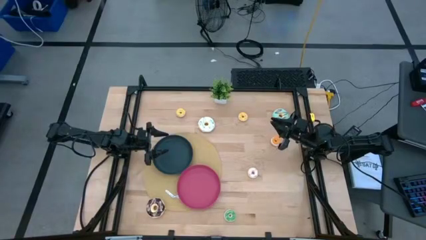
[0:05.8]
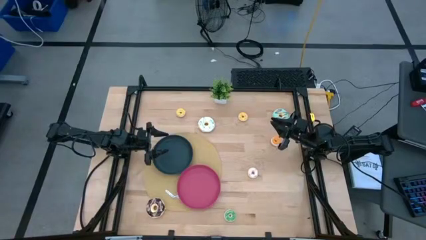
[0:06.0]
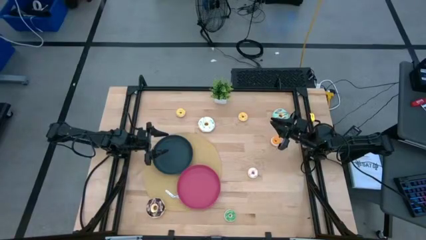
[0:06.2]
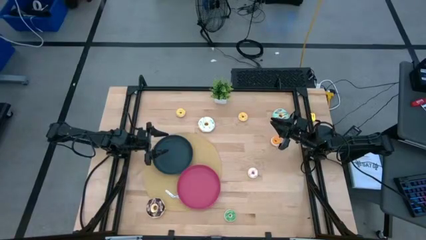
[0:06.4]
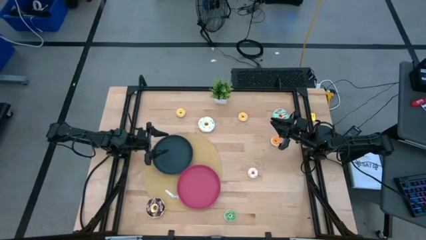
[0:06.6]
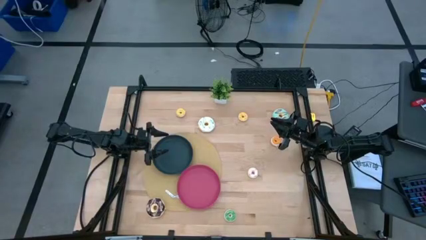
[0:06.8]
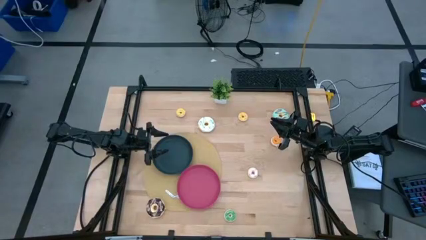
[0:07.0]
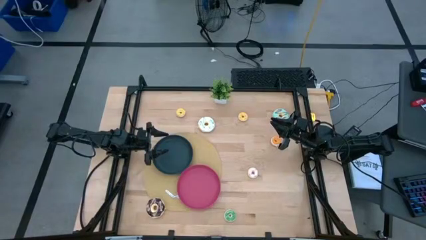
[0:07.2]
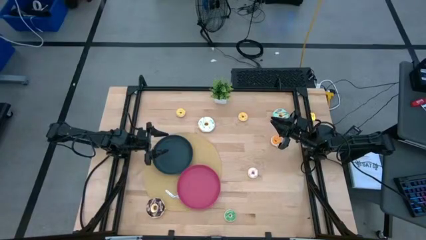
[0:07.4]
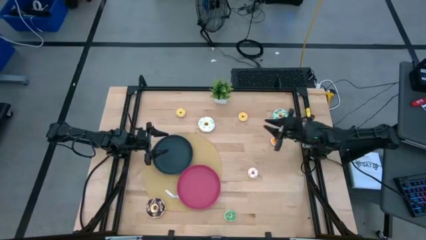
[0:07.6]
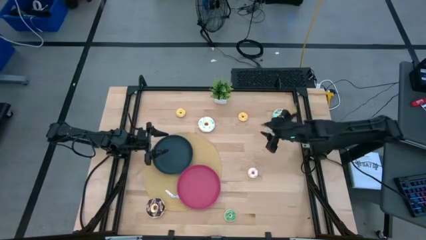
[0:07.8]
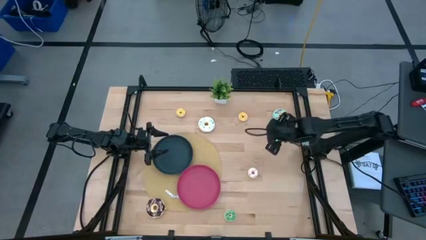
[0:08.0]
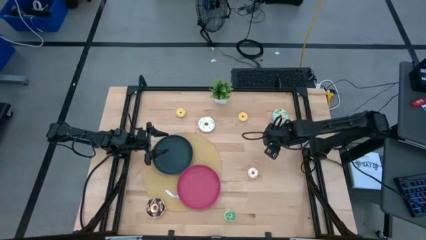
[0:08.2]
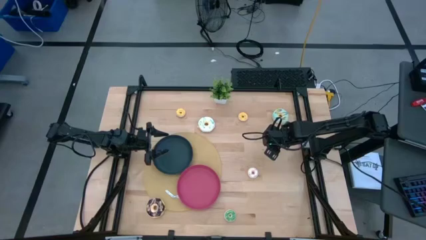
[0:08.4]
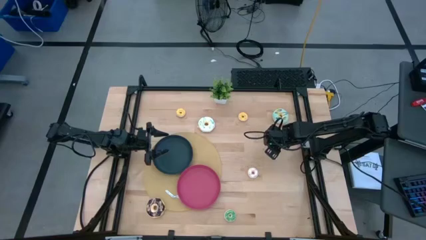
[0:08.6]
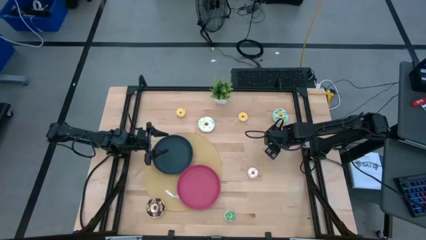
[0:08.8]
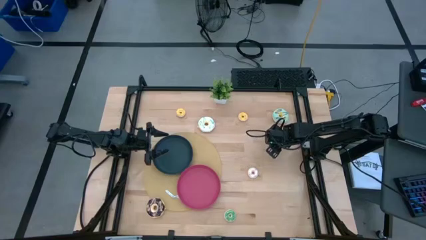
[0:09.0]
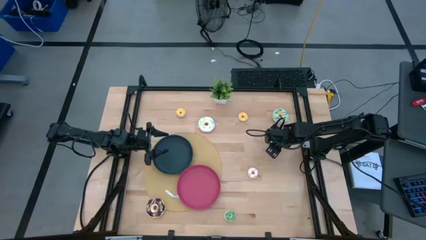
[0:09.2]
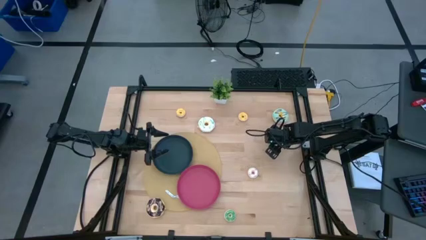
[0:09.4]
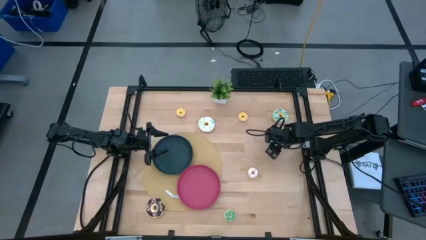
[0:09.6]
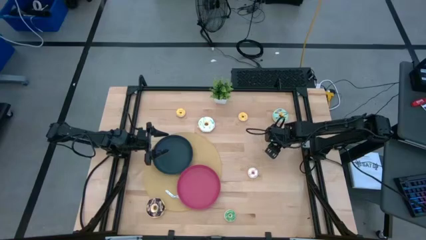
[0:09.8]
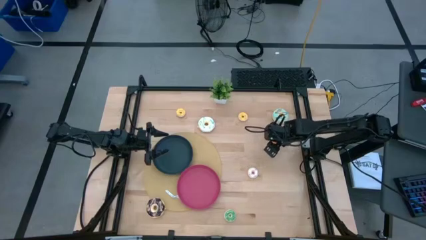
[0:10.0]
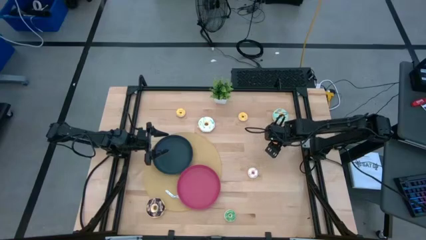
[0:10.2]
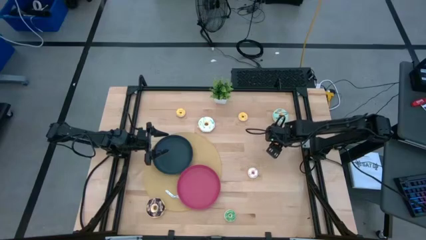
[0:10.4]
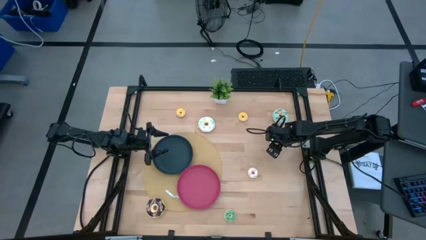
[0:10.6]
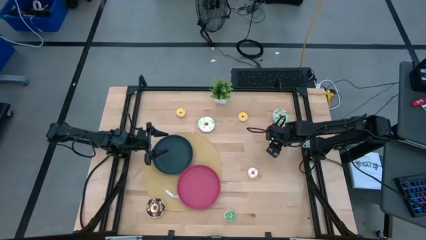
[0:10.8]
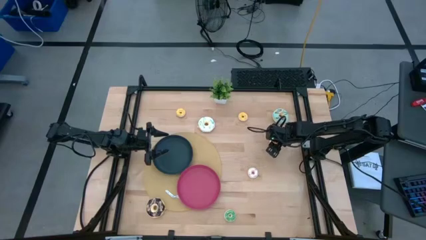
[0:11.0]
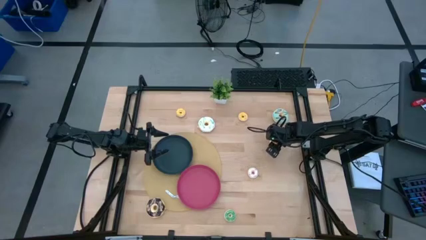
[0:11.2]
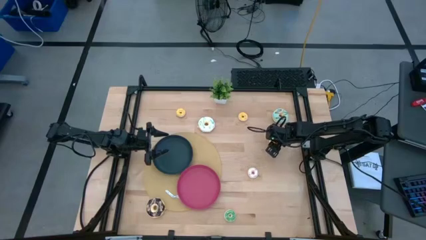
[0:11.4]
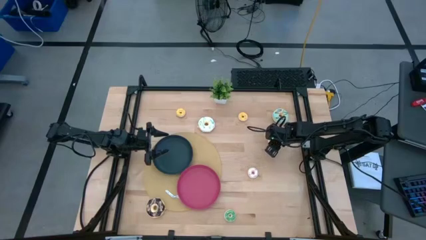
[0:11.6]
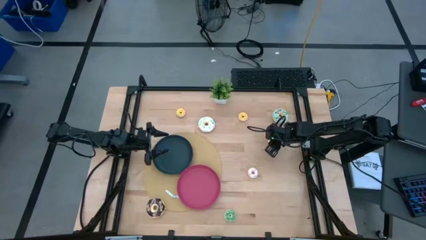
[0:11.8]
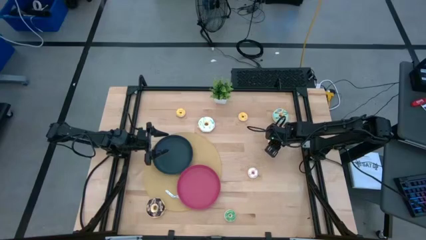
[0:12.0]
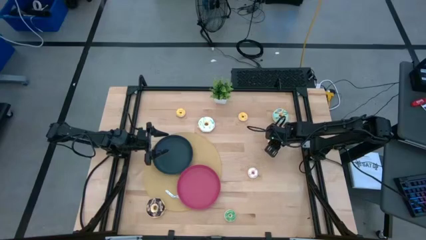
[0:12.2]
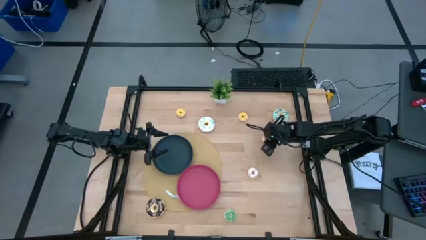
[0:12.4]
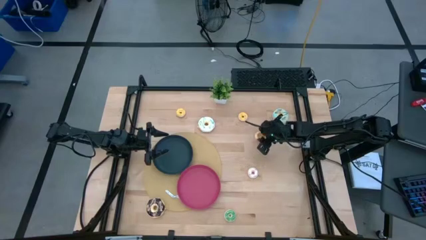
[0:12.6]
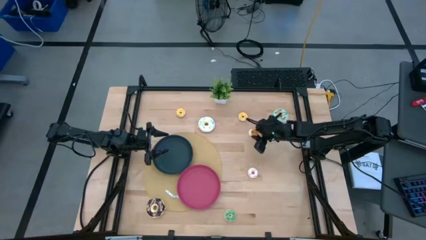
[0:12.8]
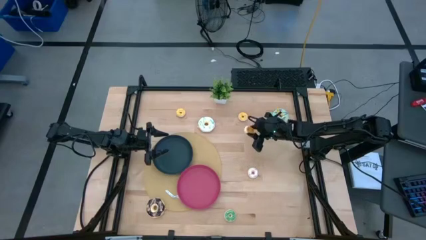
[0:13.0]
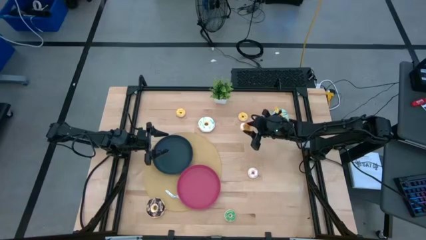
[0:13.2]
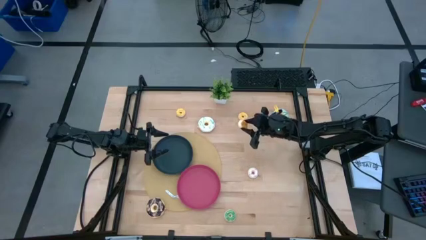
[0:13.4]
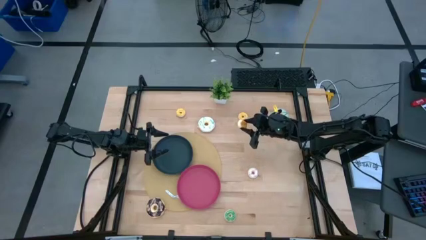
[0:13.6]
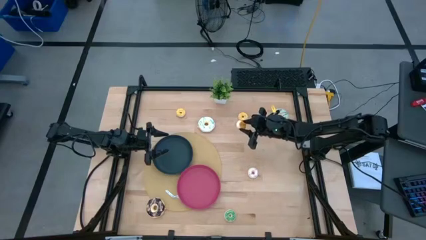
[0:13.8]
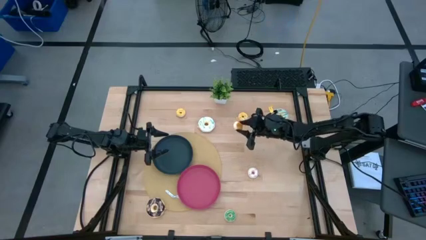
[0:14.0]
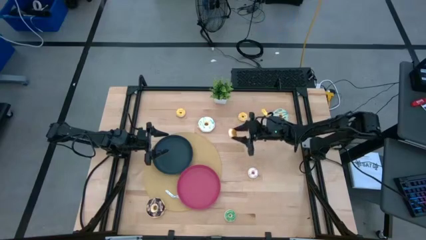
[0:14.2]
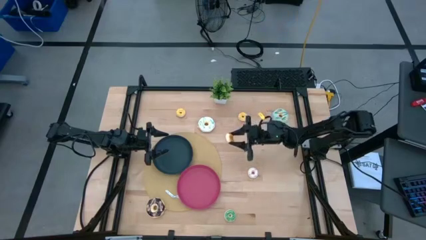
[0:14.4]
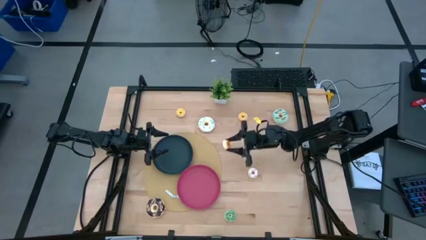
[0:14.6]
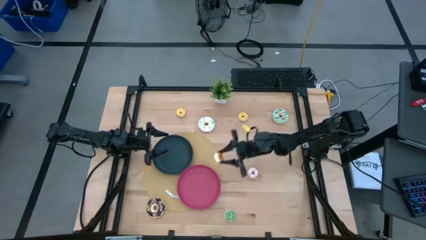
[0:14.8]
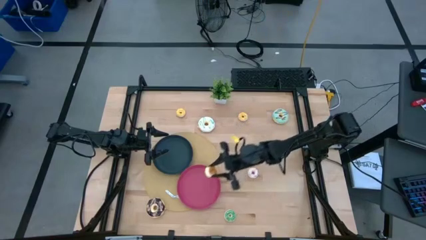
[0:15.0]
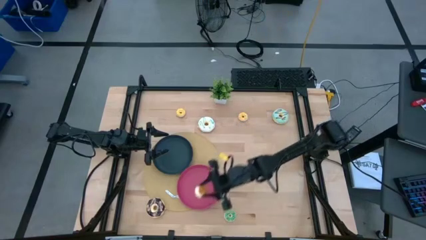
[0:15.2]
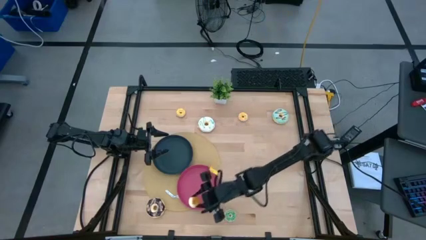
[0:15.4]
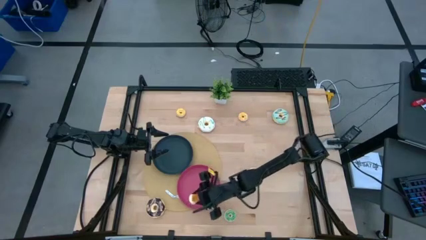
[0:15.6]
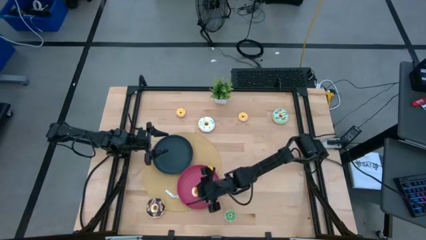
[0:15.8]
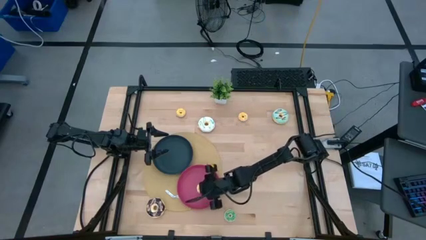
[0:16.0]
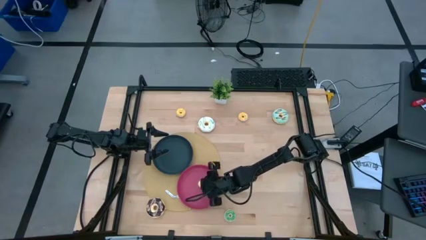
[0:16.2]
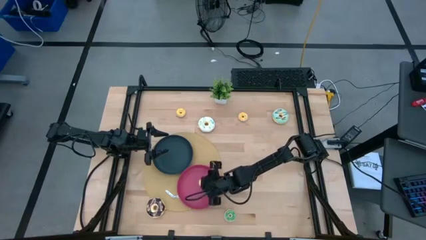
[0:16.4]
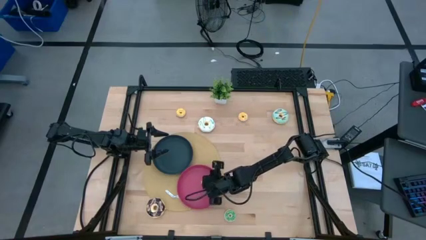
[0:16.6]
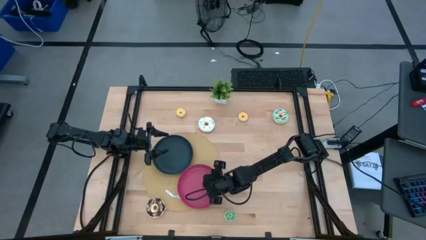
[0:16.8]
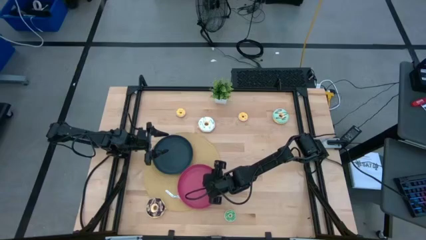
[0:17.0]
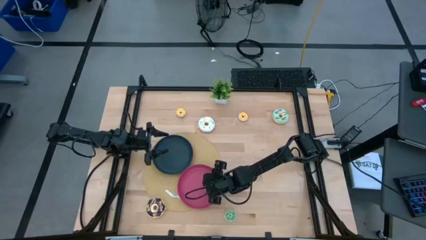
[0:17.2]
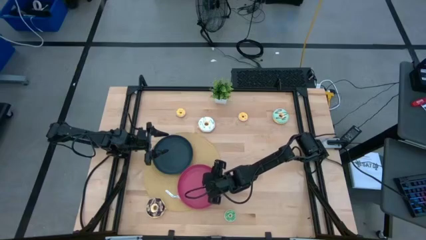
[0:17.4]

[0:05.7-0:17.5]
Task: Pick & Place donuts
Put the small orange donut into the pink plate
